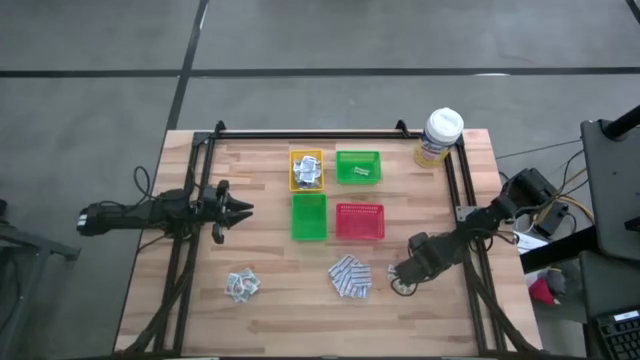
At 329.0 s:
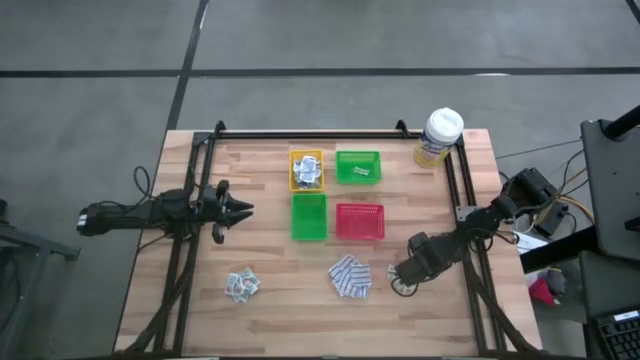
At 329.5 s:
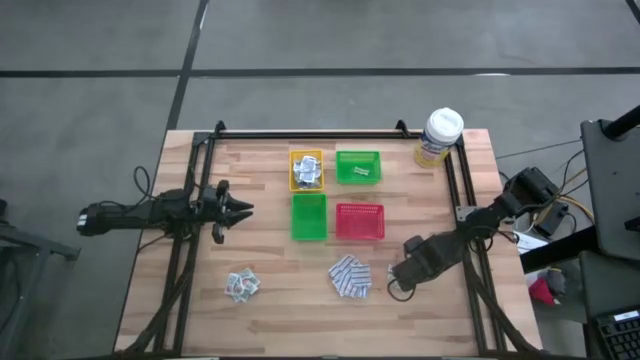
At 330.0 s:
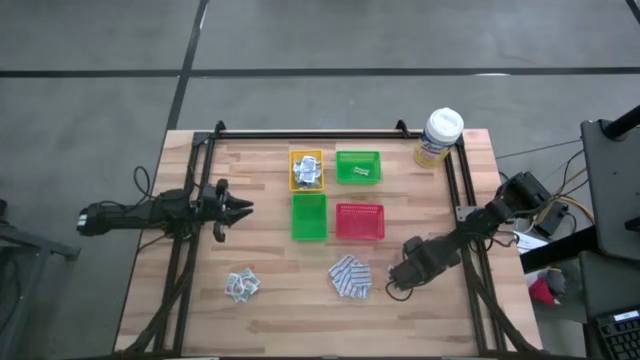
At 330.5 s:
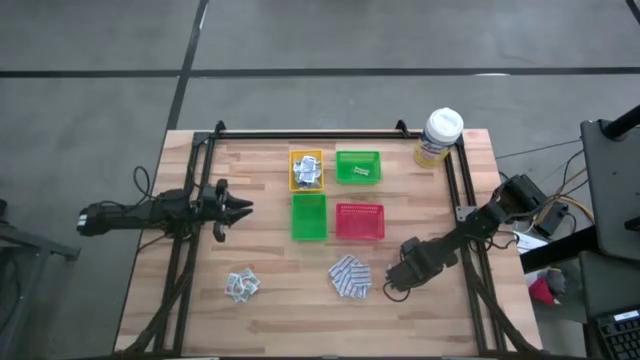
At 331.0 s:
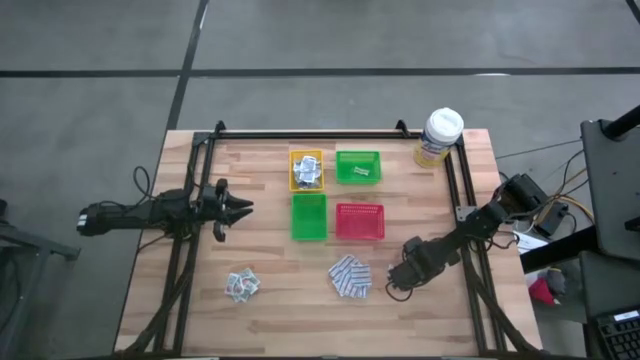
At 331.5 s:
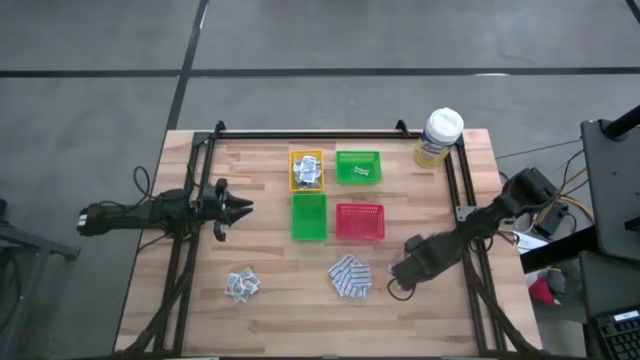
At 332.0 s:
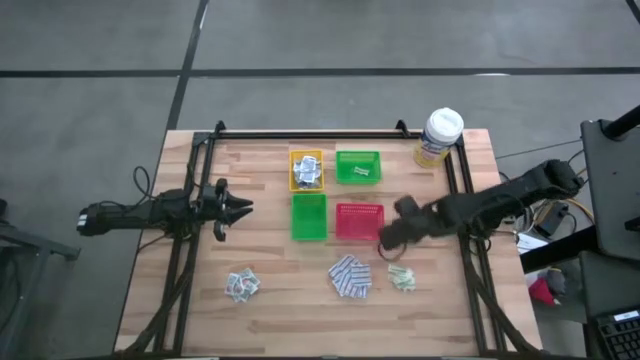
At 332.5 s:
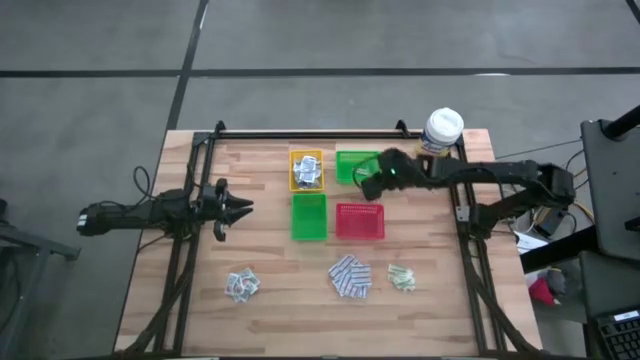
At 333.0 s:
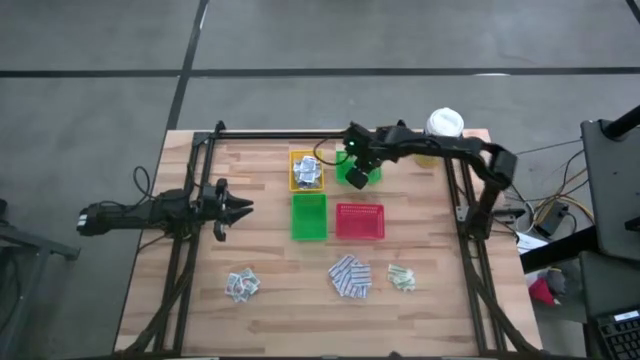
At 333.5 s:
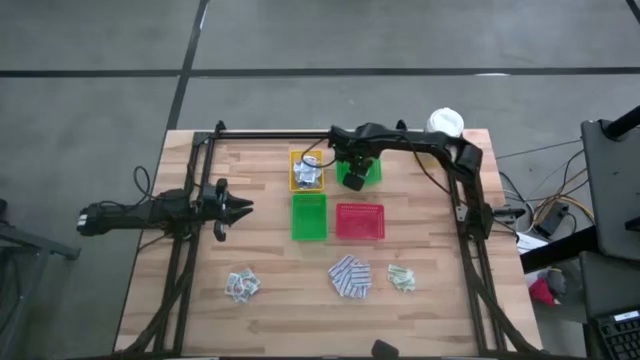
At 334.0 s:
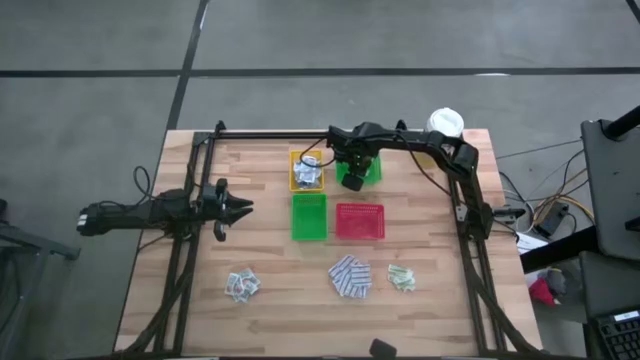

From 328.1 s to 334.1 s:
Task: Pick & Place First Aid Supplies
Put the green bandage pack into the top green bin

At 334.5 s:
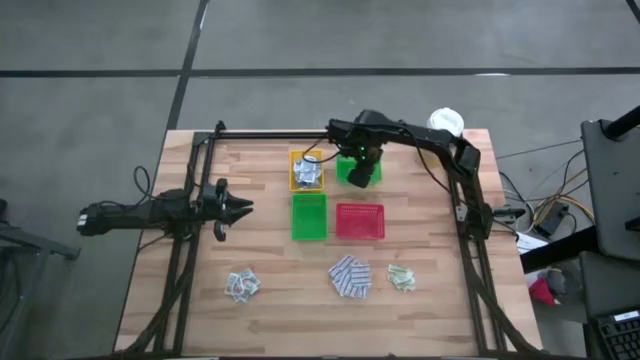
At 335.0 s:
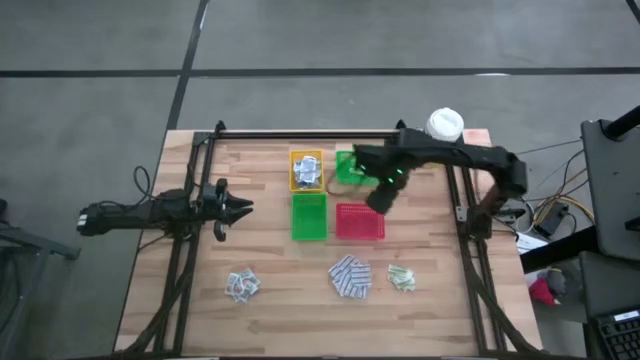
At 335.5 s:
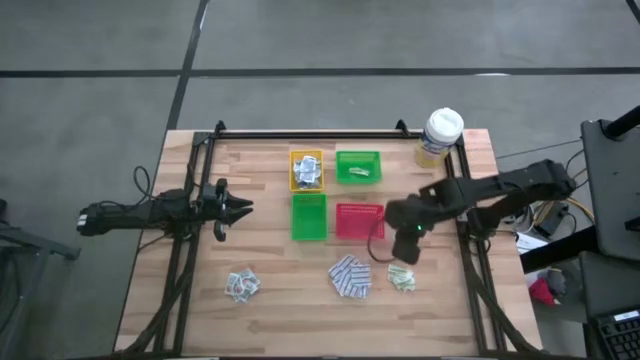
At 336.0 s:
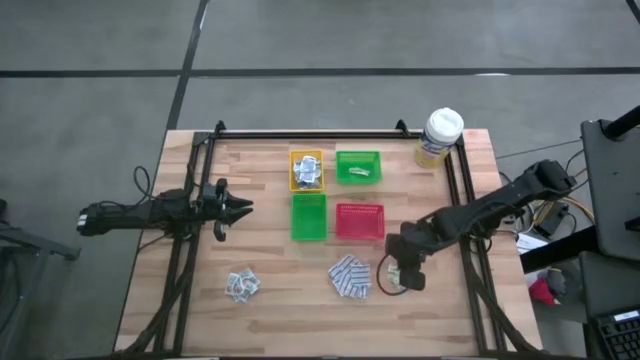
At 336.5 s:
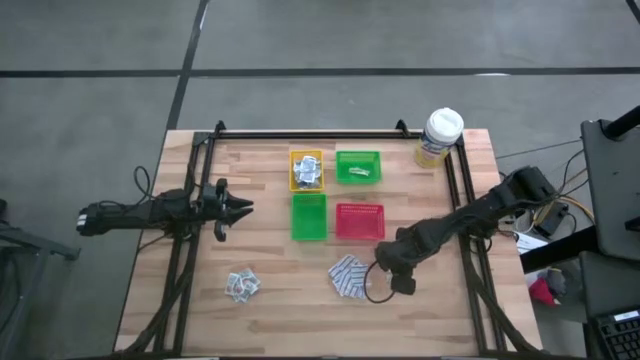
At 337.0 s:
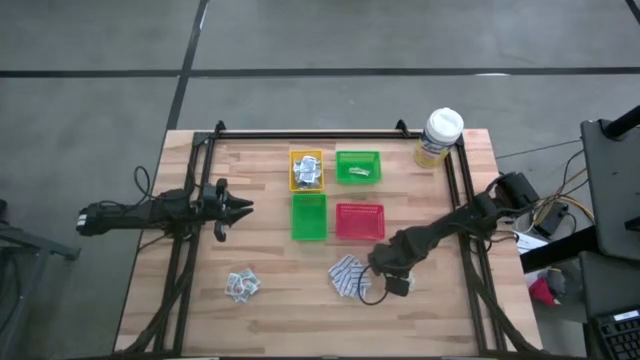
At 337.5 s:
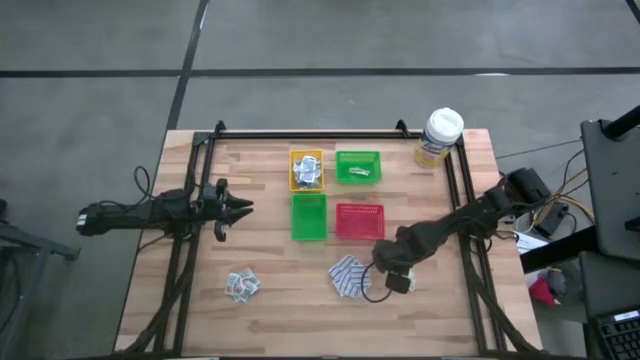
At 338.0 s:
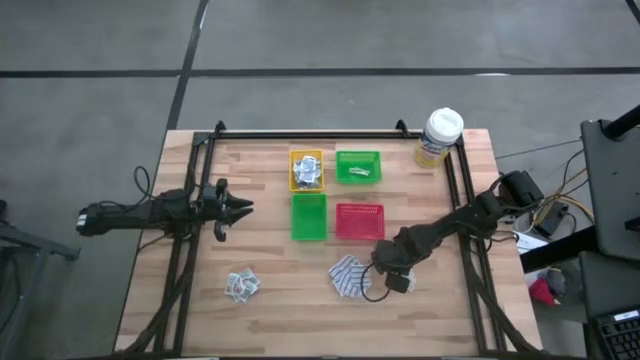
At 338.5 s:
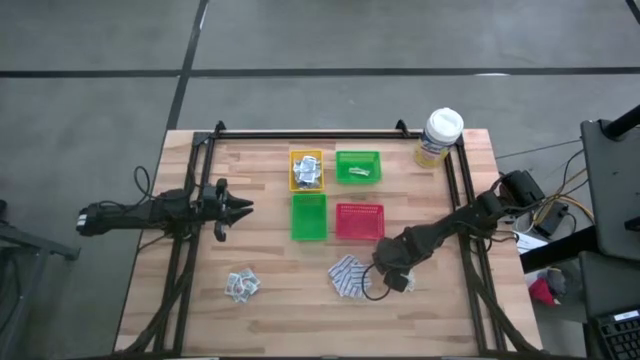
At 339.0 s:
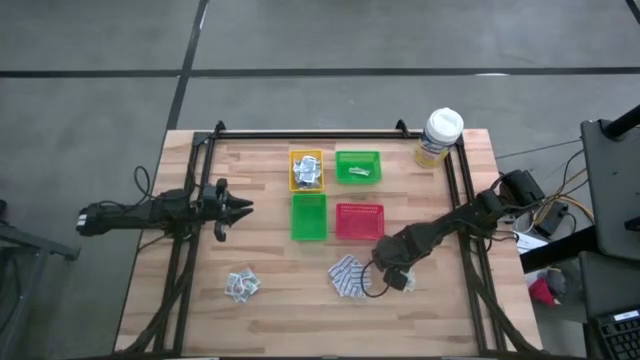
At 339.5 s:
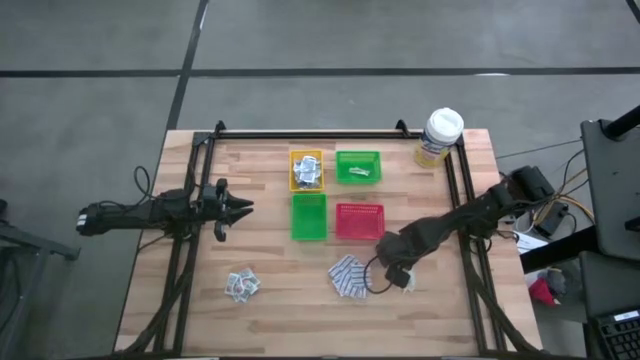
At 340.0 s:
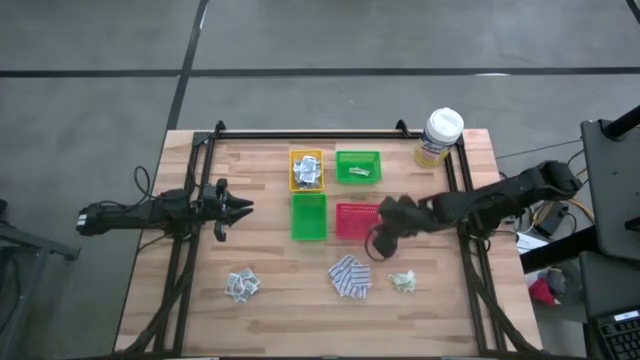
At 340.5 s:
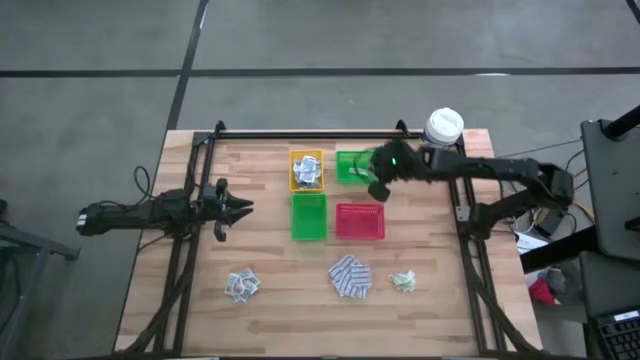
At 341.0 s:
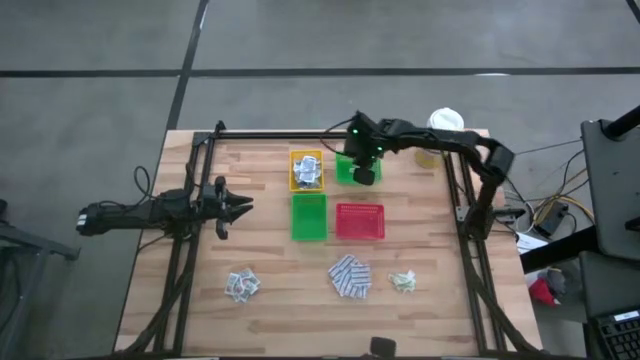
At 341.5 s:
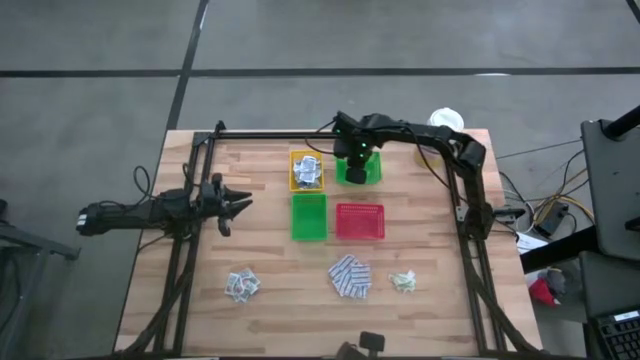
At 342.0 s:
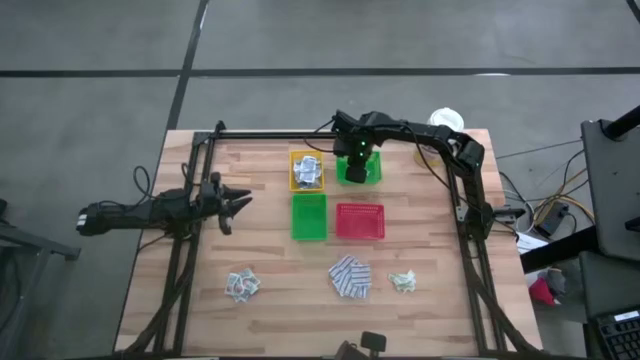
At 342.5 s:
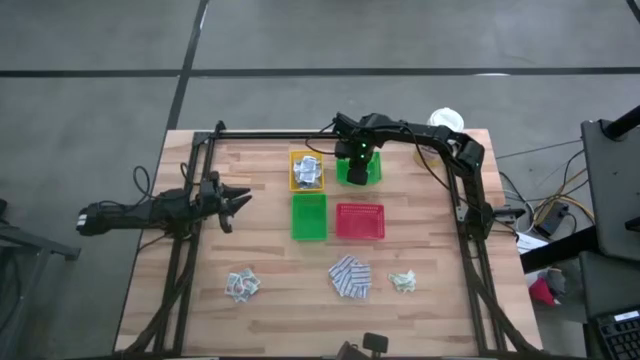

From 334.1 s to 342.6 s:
Put the green bandage pack into the top green bin

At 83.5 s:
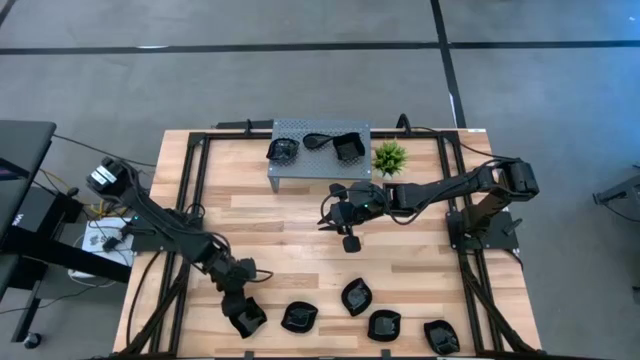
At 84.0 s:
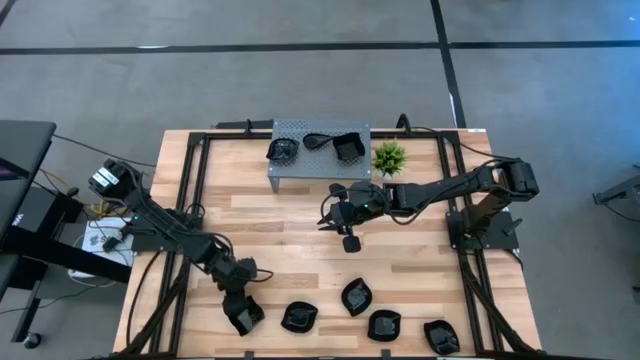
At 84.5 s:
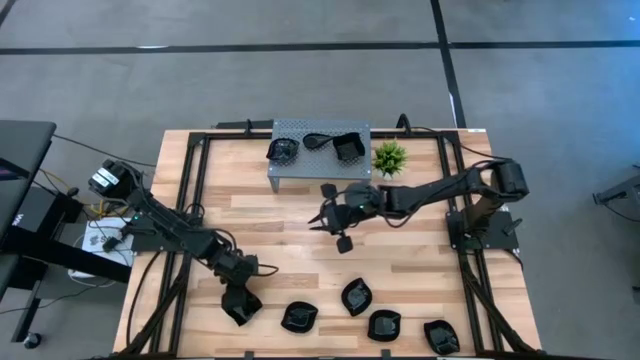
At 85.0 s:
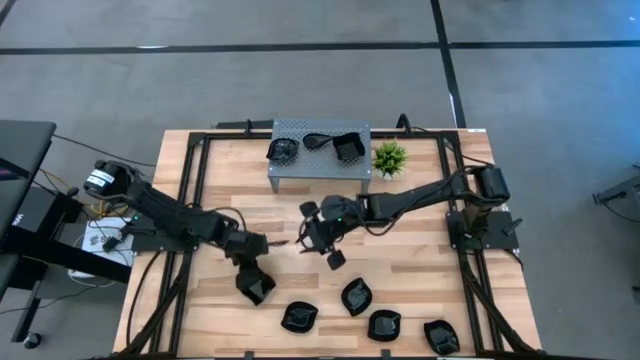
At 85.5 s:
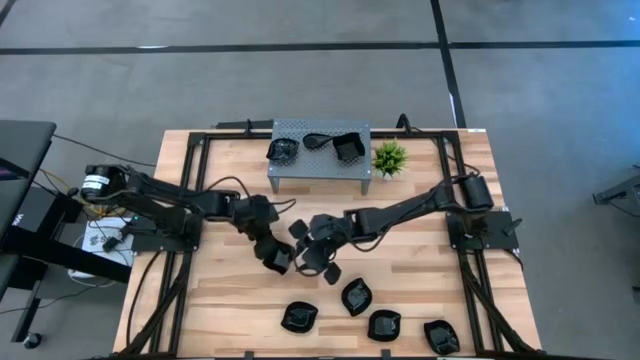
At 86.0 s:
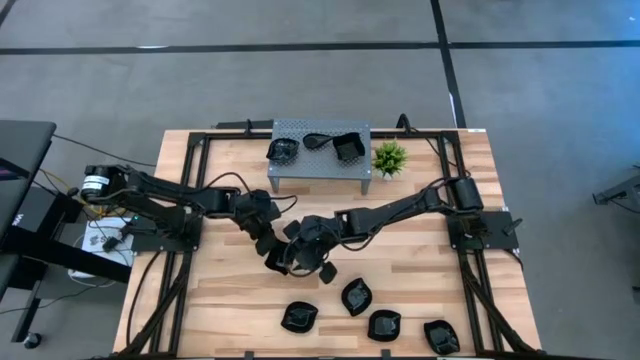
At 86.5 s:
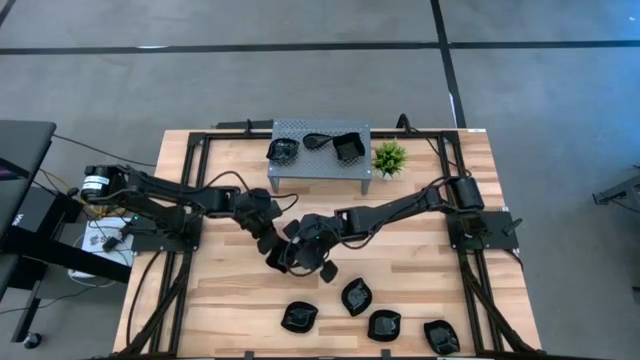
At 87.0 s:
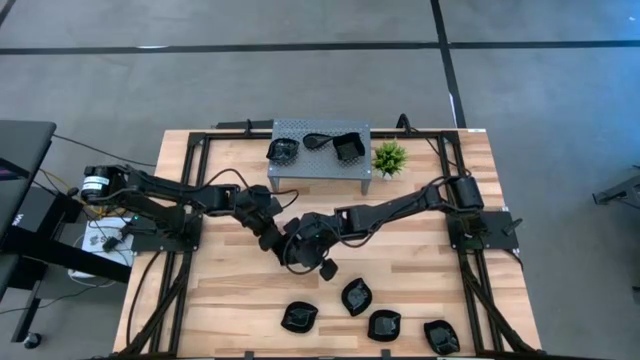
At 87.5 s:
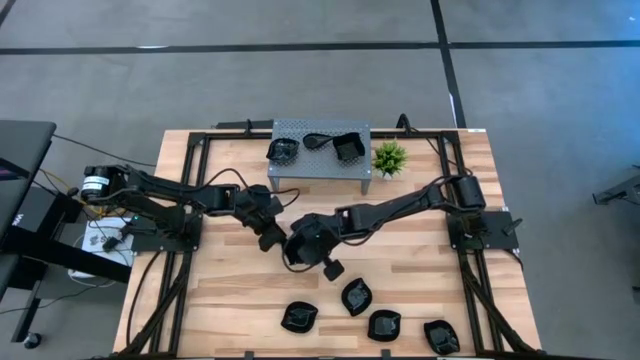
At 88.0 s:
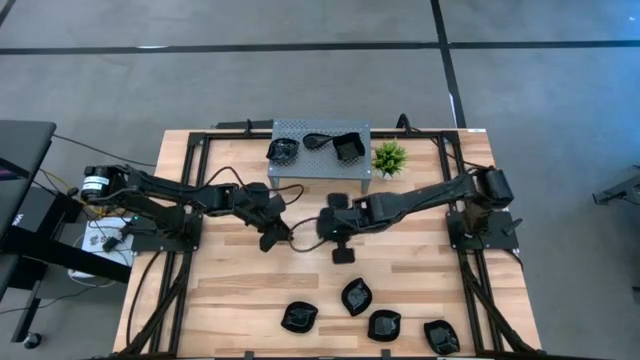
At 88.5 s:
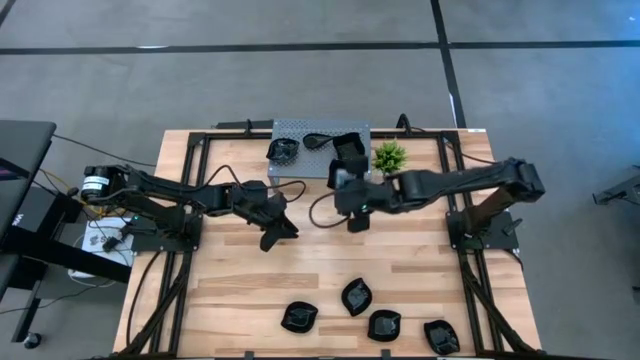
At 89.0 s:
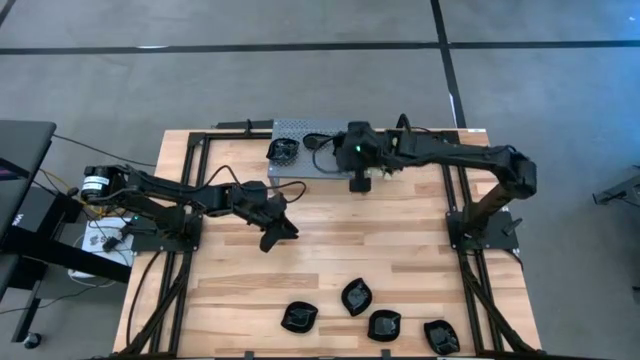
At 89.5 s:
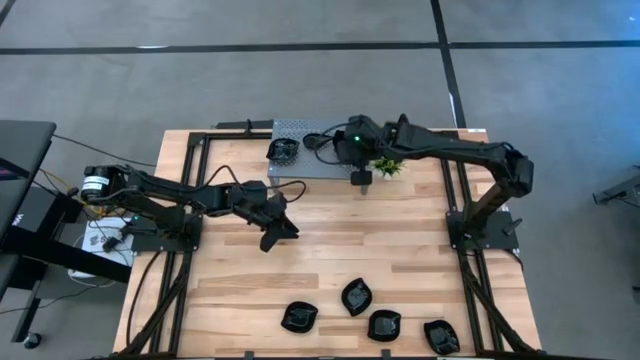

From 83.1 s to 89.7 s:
Task: Pick & Place Mini shaped plates
Stack the distorted square plate on top of the distorted square plate on the shelf
